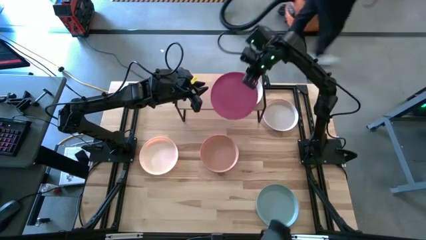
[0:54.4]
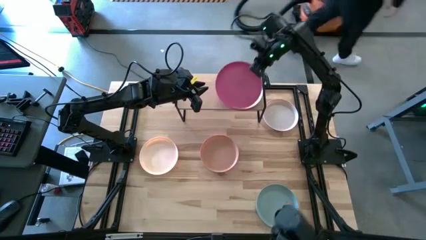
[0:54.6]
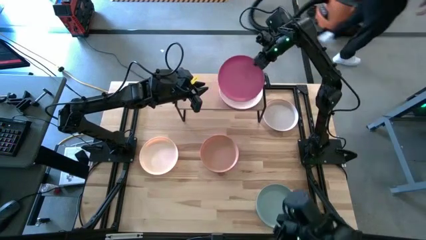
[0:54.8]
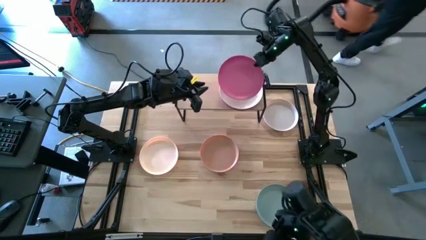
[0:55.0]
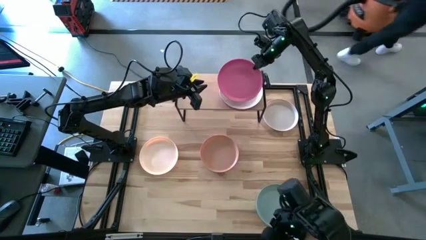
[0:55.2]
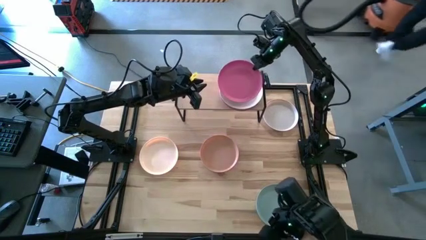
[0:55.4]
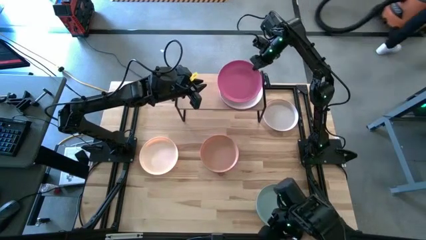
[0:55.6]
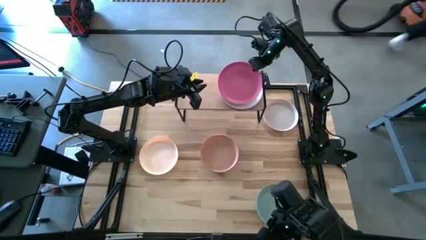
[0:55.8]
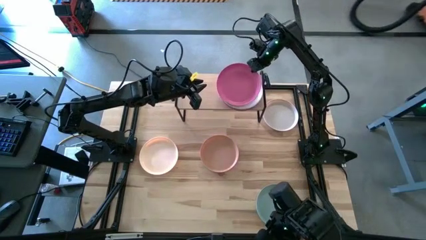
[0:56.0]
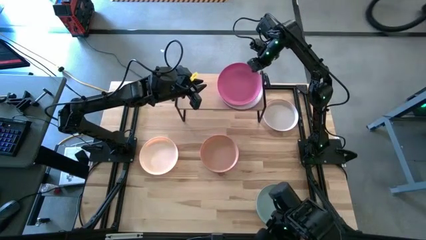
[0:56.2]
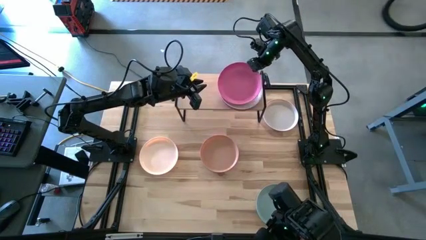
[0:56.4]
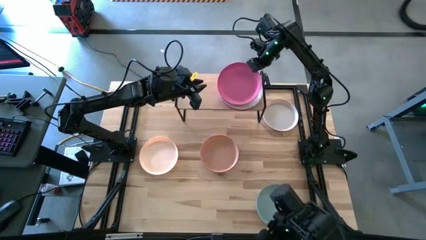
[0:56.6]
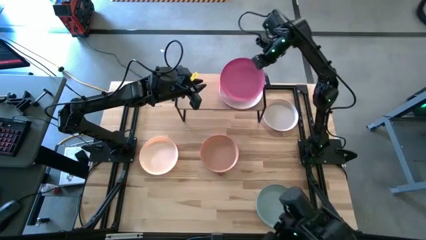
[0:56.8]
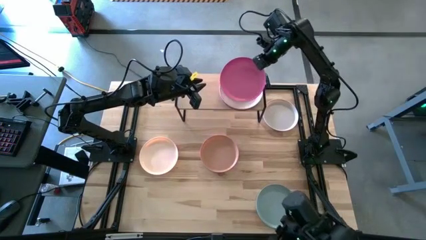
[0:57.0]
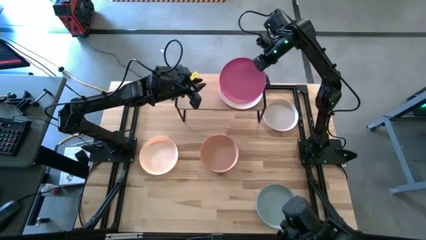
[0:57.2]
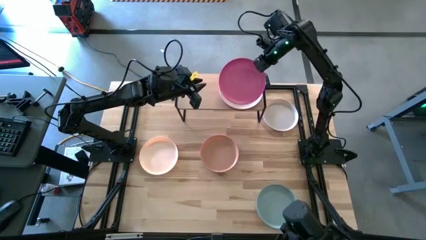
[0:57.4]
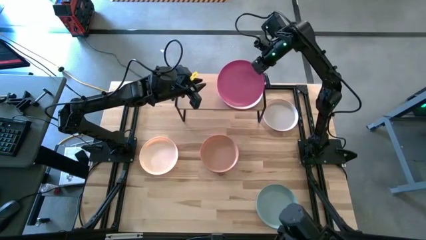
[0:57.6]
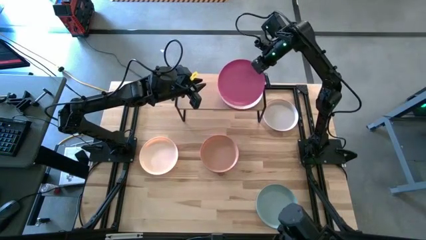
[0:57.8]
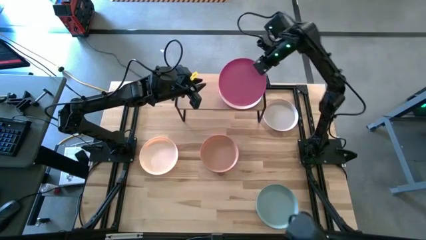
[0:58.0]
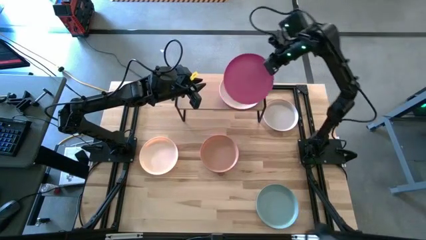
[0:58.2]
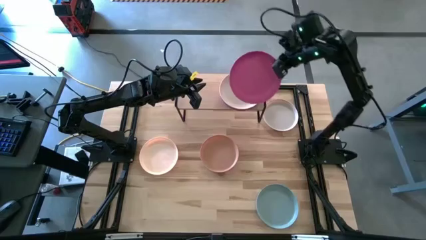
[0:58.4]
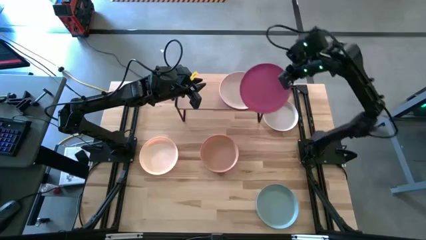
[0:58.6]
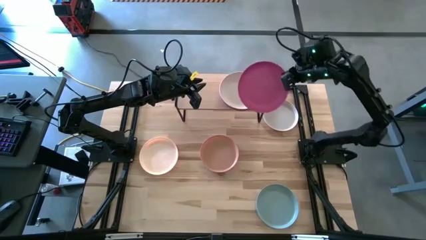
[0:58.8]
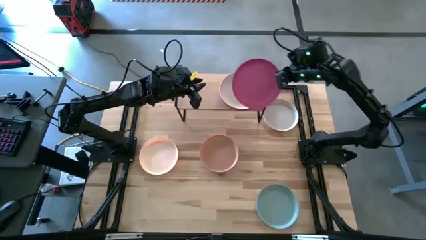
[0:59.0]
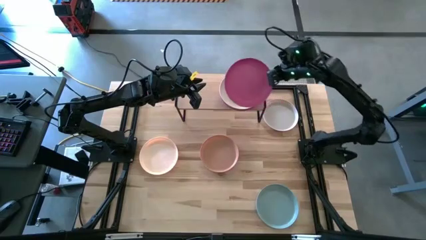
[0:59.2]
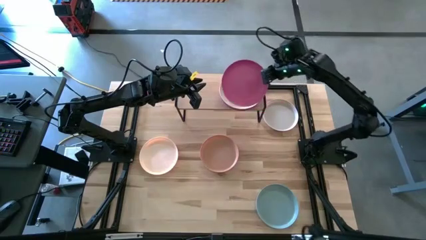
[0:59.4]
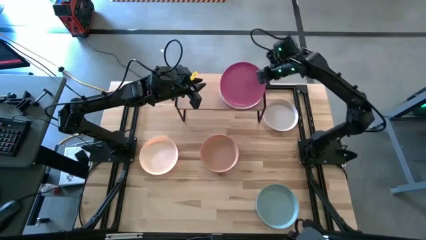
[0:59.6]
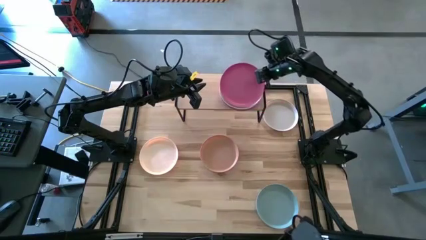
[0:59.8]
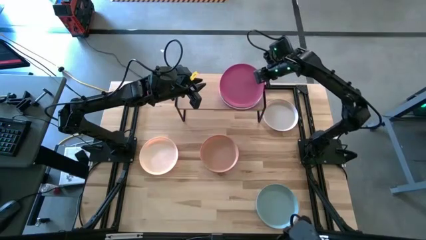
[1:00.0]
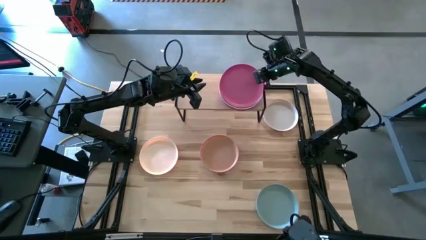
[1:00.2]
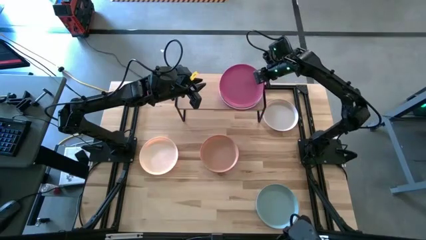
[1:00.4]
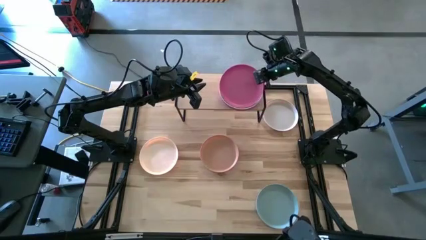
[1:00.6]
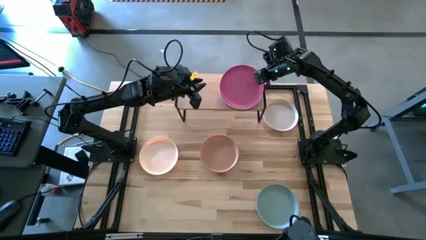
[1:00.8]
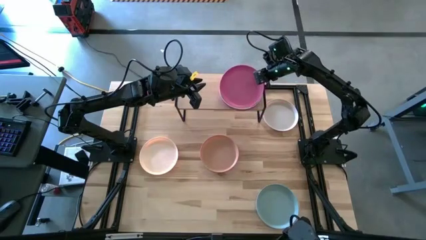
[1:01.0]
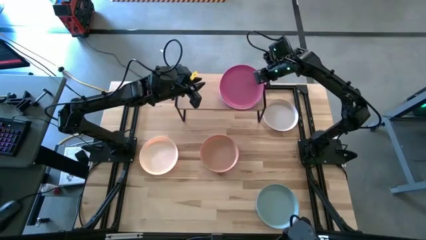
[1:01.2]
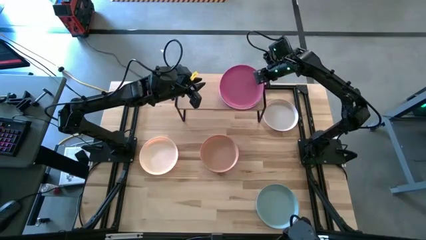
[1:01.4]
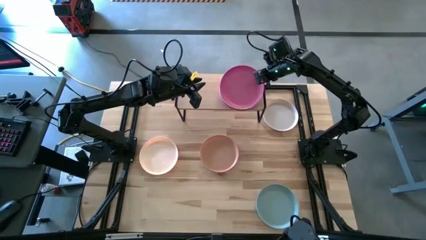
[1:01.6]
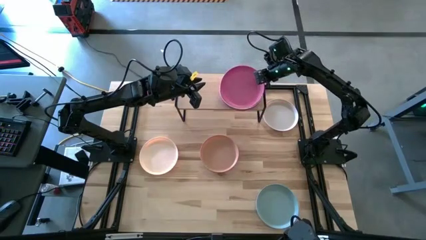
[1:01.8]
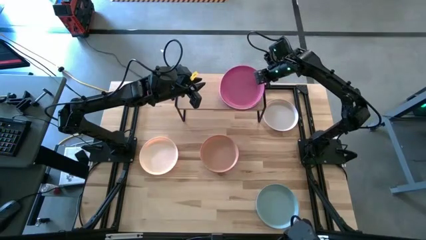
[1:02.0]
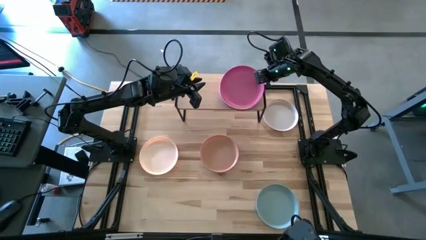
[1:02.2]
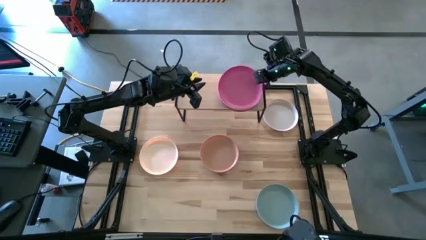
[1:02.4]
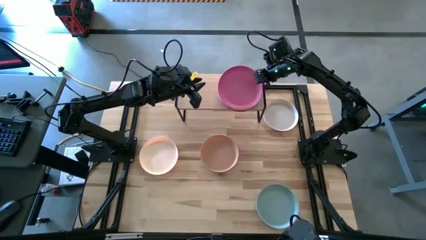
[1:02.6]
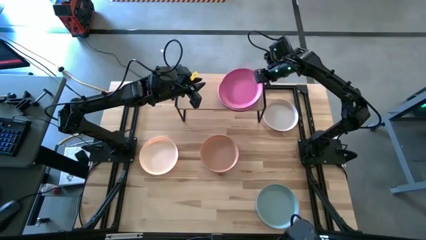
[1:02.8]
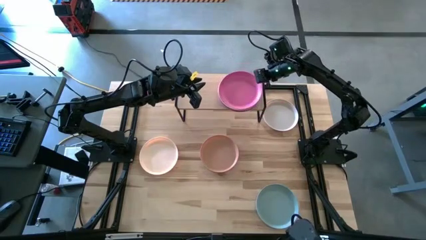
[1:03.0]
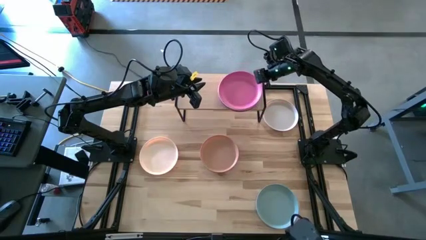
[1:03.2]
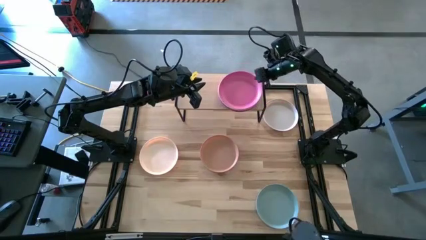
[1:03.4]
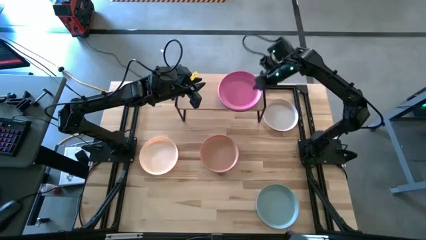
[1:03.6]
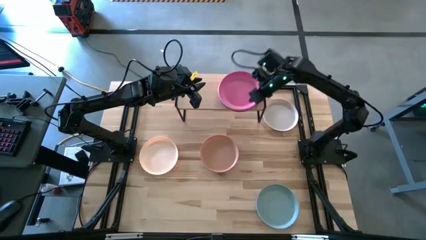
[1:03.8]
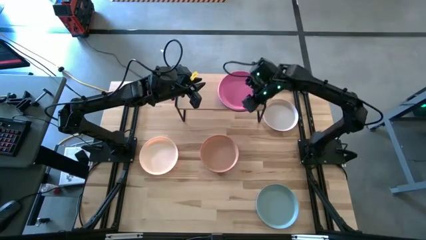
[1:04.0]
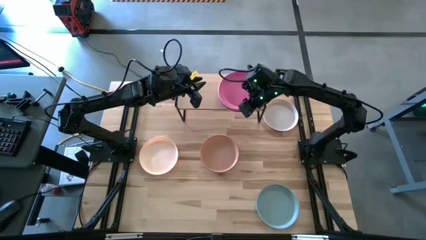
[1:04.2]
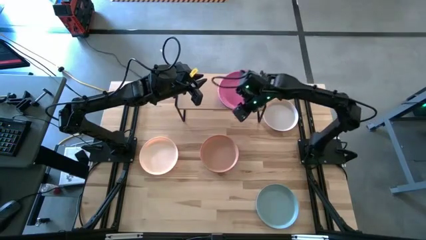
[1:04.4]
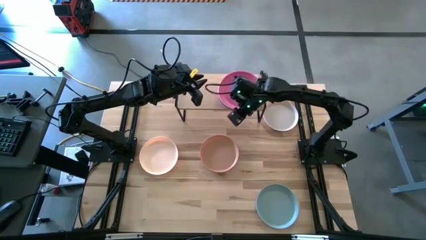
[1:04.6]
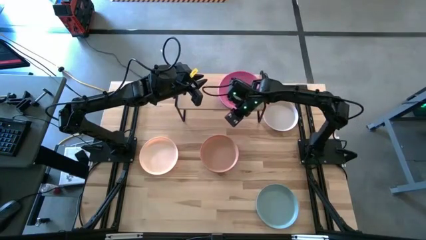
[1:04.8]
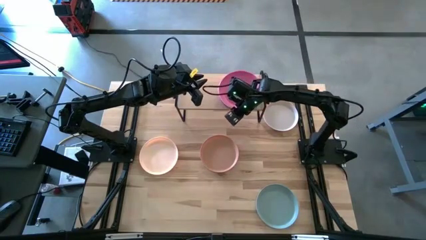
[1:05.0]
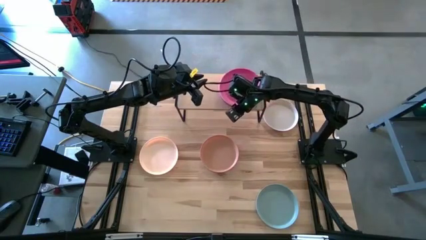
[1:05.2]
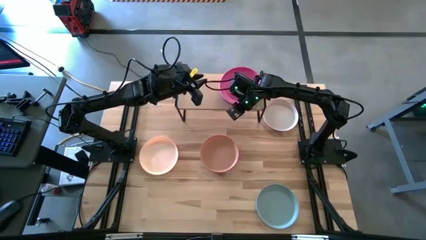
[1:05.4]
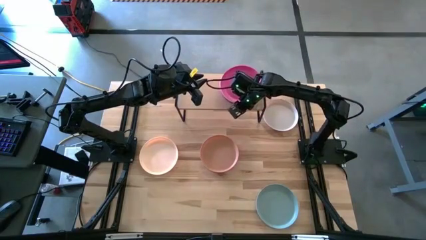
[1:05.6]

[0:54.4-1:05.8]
Task: Place and stack plates onto a shelf
Stack the pink plate on top of the gray plate

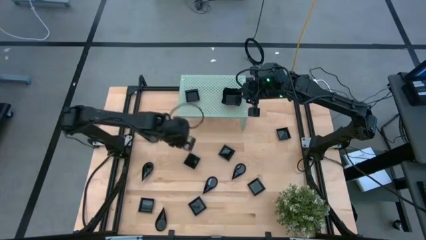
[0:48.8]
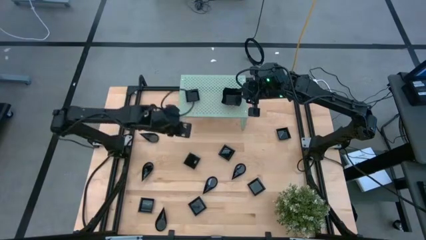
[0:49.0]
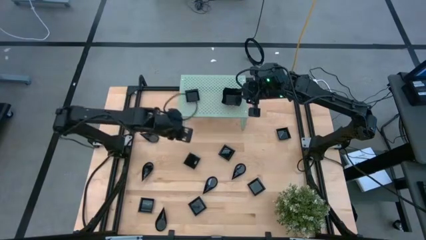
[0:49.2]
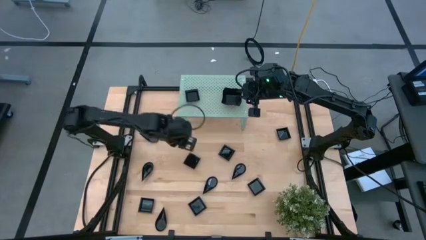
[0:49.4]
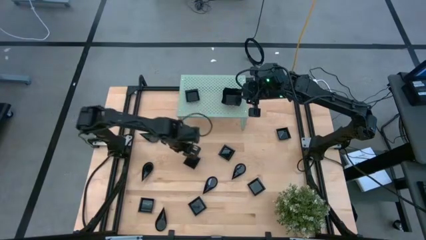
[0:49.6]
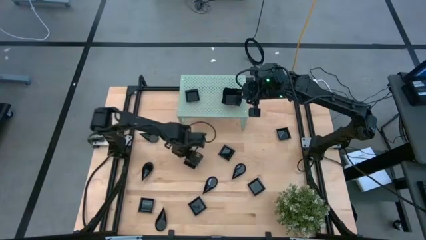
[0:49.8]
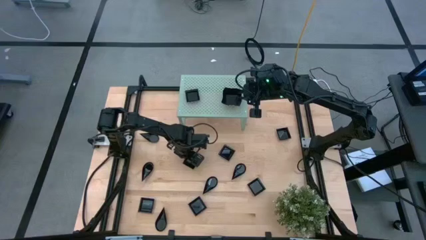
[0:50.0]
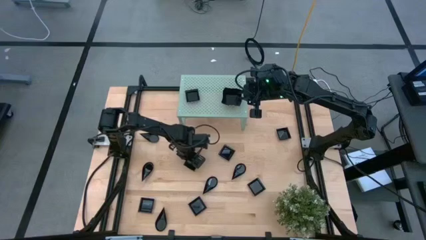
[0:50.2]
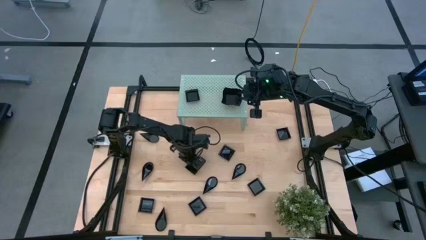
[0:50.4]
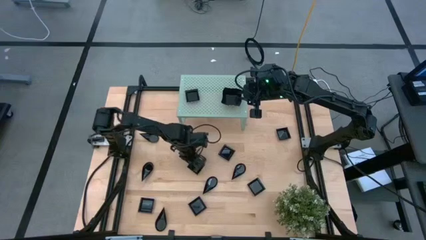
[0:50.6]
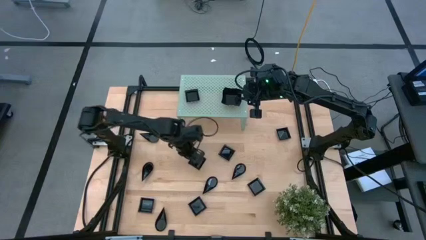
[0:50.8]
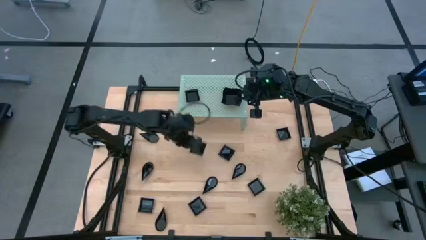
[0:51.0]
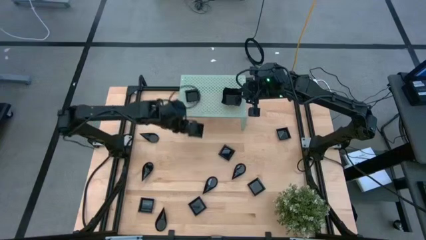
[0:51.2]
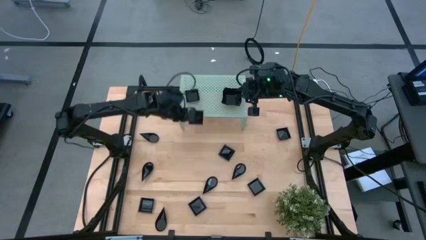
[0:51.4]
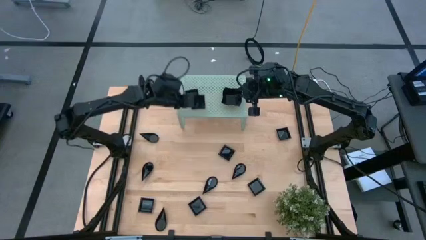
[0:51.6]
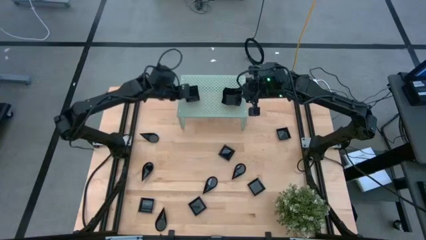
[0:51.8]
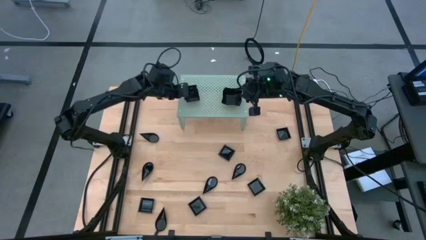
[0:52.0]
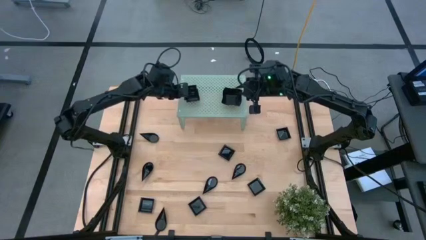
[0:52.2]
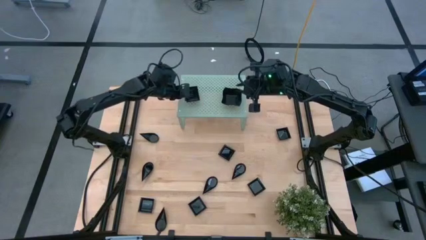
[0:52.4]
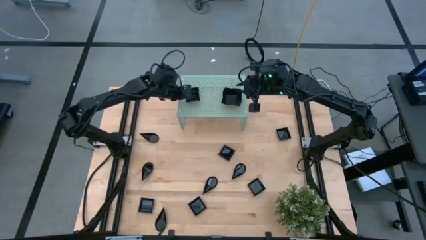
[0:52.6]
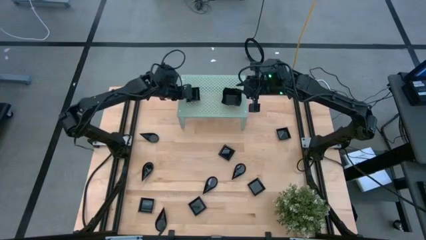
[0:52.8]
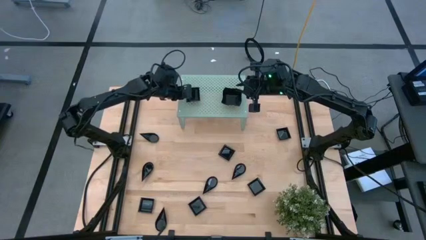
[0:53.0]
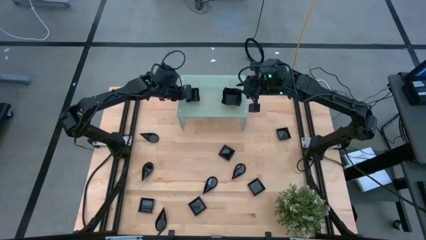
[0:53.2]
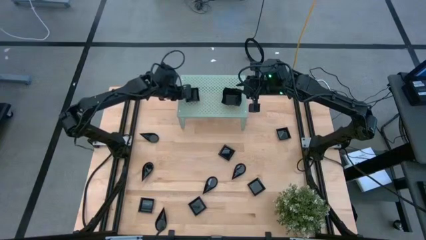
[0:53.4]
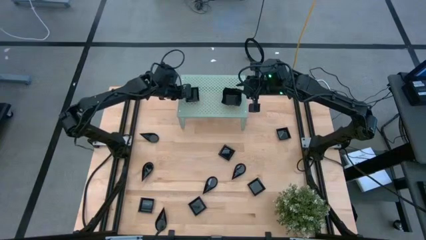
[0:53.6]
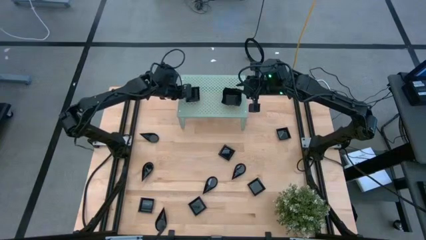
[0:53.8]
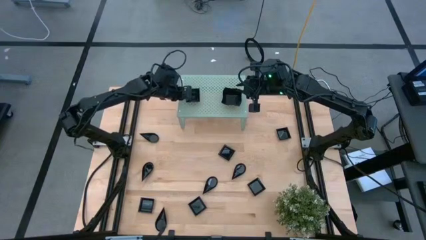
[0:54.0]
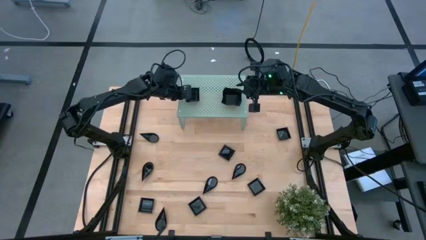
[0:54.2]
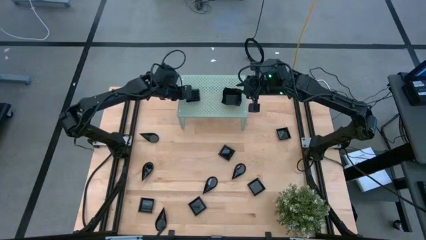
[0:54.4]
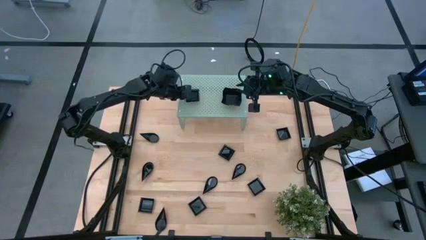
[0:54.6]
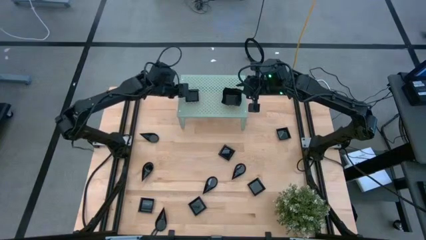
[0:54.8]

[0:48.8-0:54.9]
Task: Pick & Place Mini shaped plates
Stack the black square plate on top of the other black square plate on the shelf
